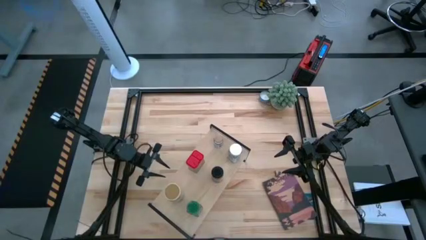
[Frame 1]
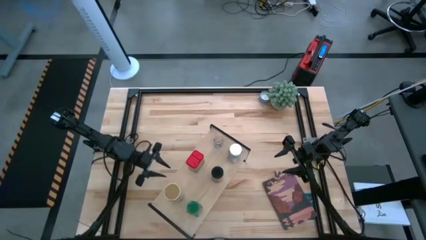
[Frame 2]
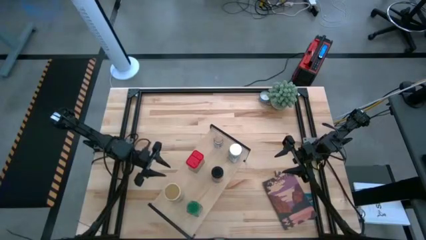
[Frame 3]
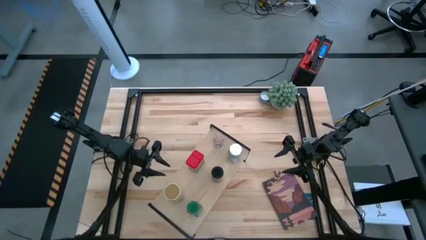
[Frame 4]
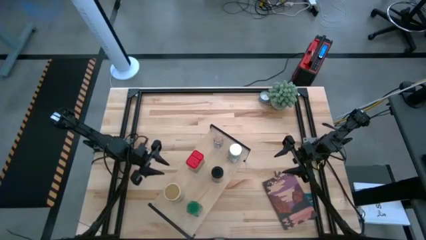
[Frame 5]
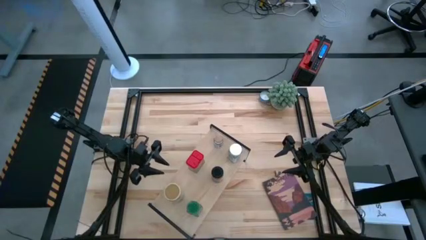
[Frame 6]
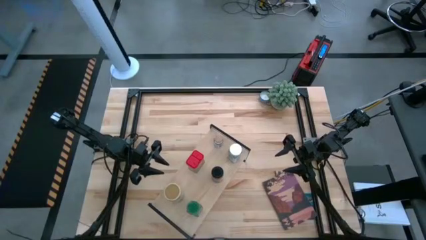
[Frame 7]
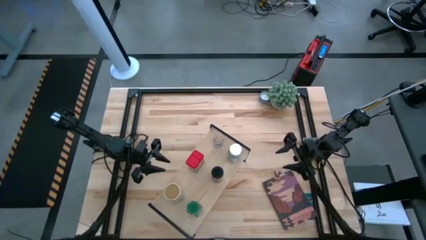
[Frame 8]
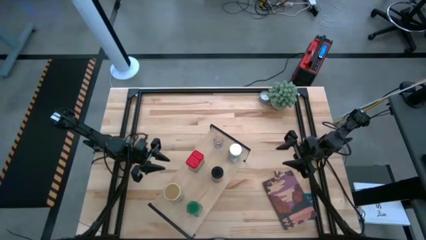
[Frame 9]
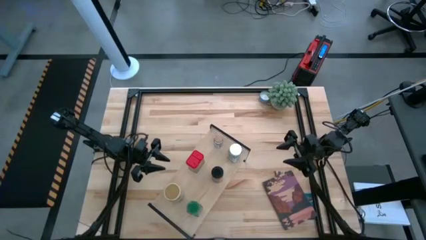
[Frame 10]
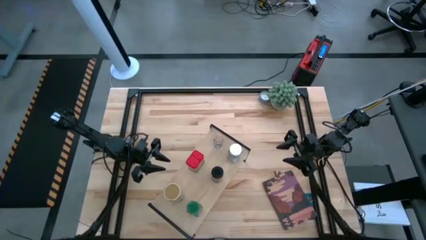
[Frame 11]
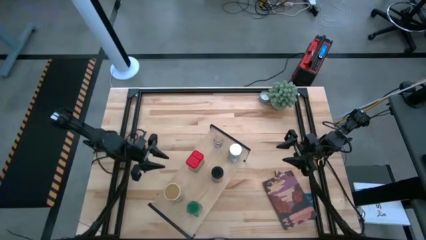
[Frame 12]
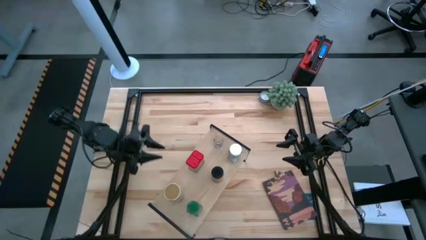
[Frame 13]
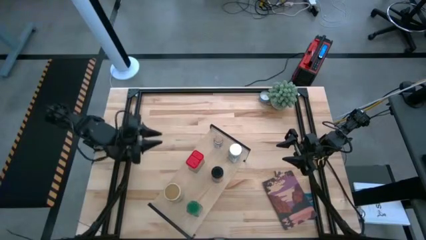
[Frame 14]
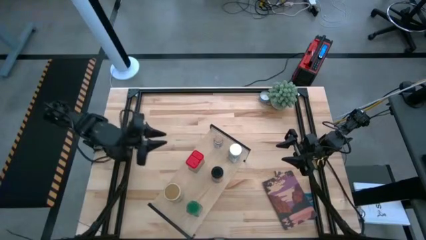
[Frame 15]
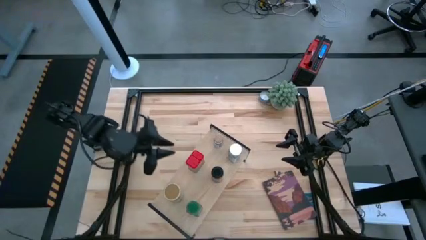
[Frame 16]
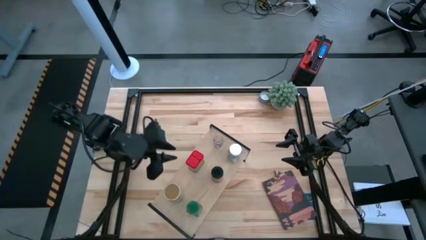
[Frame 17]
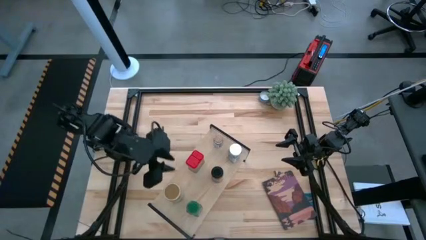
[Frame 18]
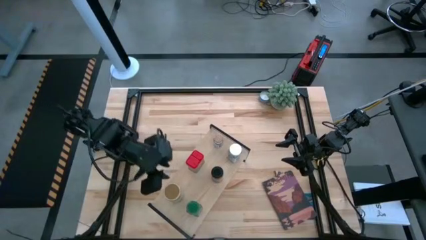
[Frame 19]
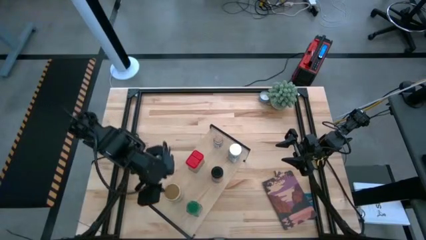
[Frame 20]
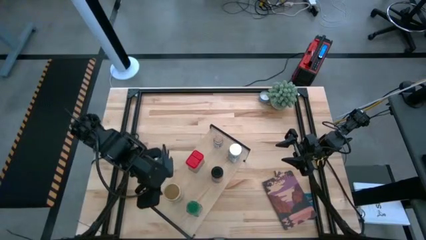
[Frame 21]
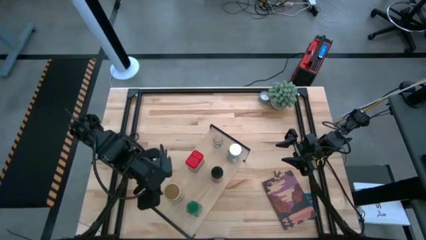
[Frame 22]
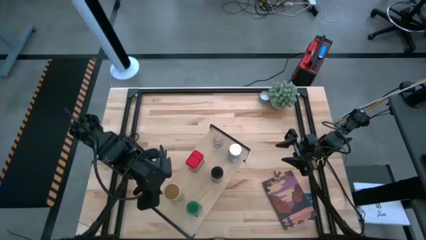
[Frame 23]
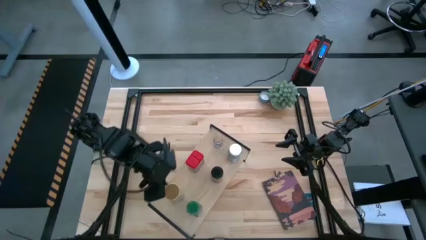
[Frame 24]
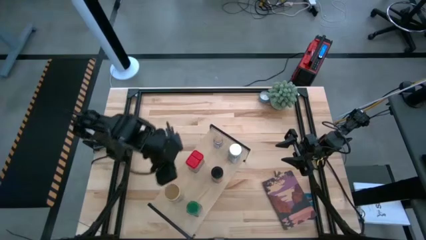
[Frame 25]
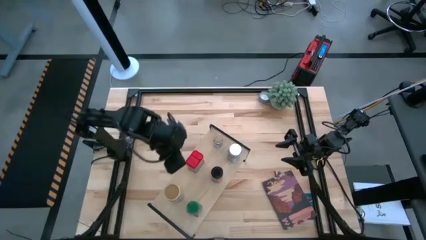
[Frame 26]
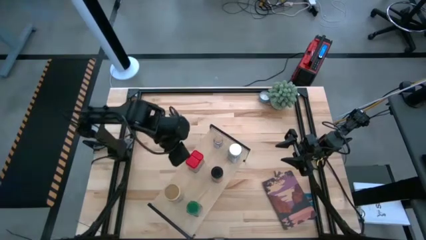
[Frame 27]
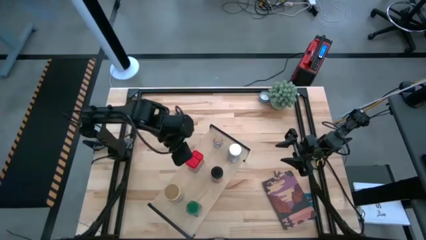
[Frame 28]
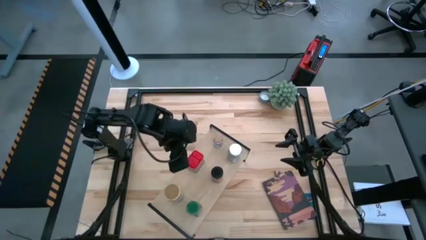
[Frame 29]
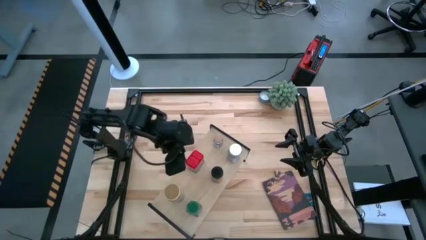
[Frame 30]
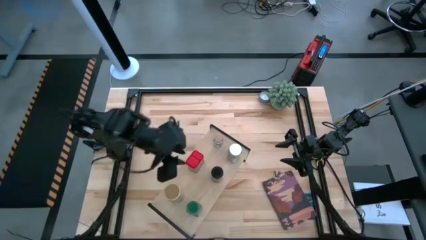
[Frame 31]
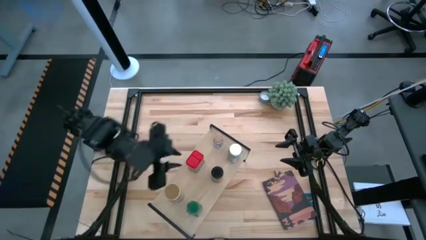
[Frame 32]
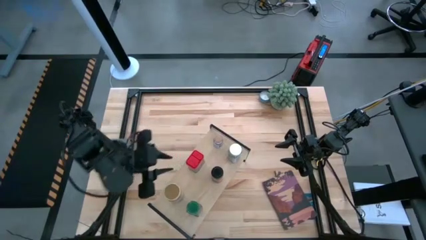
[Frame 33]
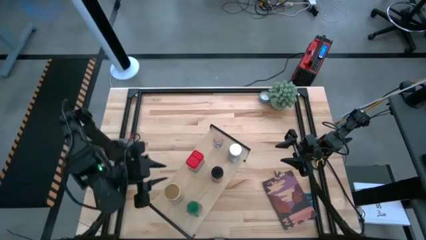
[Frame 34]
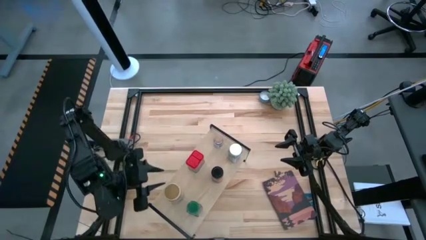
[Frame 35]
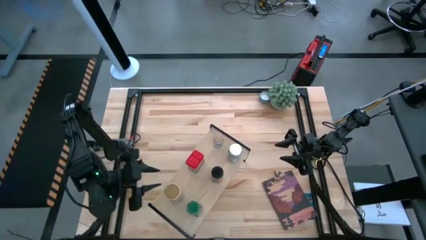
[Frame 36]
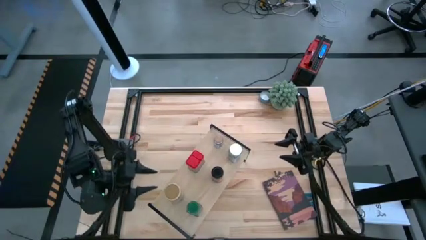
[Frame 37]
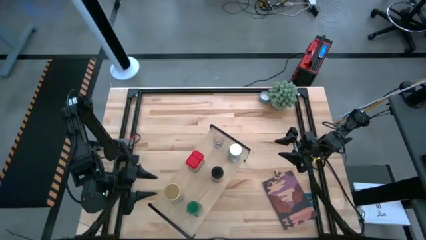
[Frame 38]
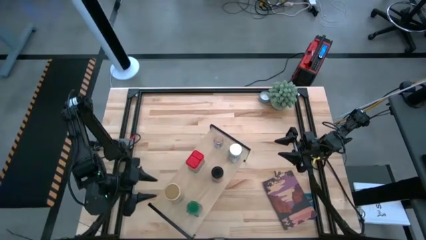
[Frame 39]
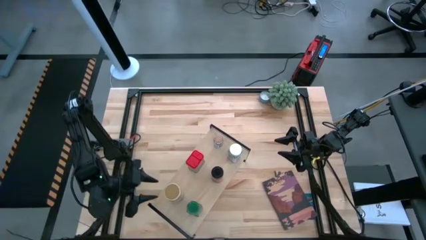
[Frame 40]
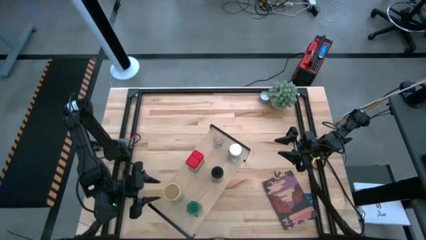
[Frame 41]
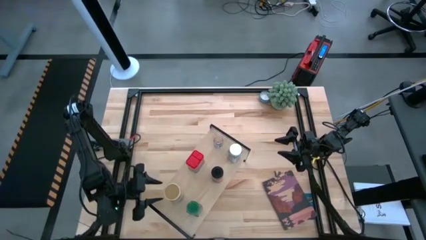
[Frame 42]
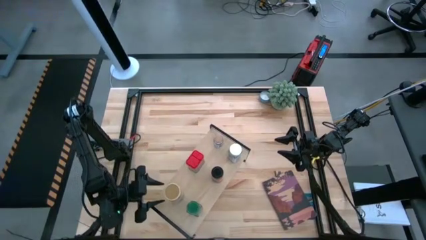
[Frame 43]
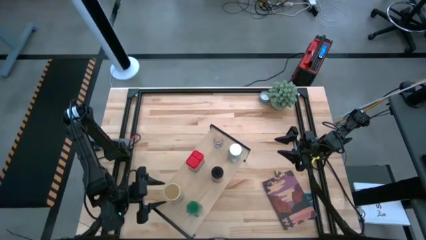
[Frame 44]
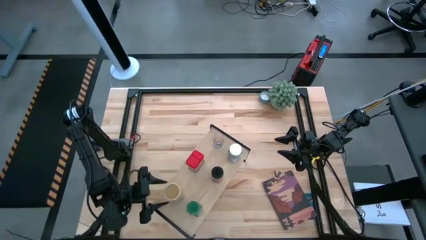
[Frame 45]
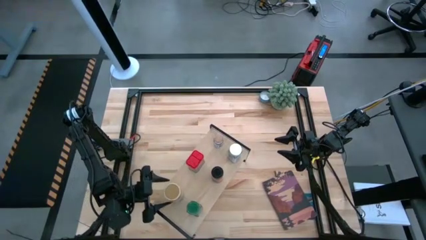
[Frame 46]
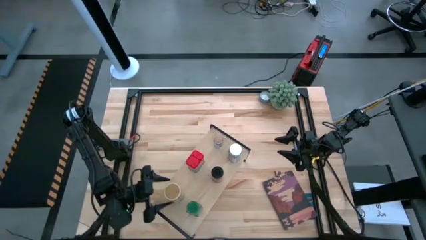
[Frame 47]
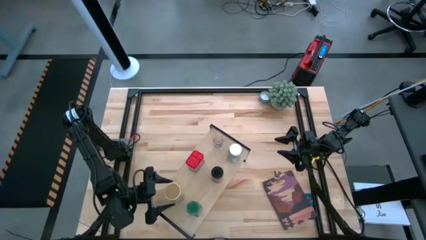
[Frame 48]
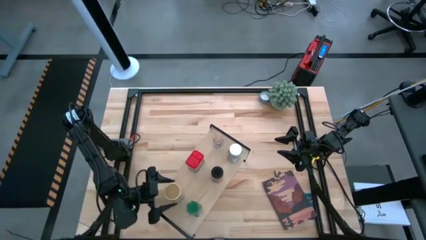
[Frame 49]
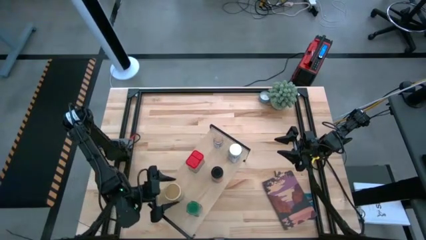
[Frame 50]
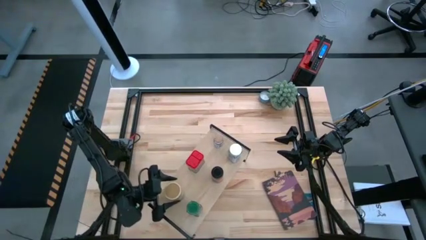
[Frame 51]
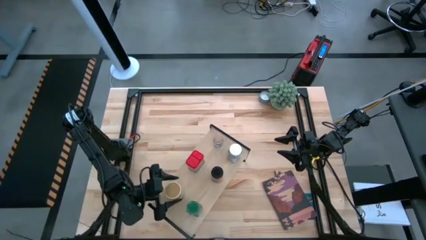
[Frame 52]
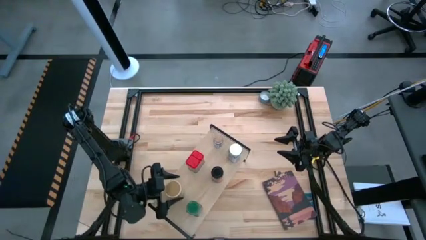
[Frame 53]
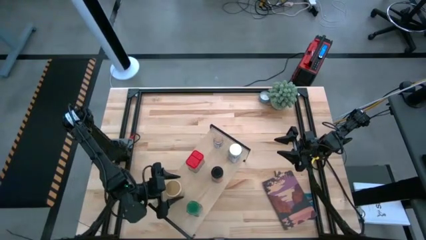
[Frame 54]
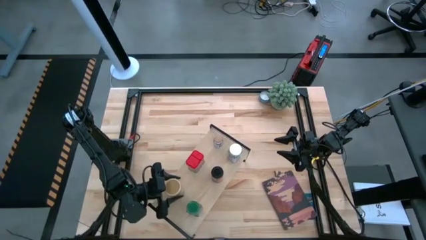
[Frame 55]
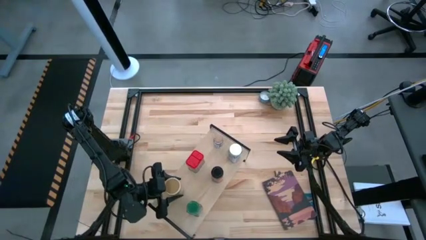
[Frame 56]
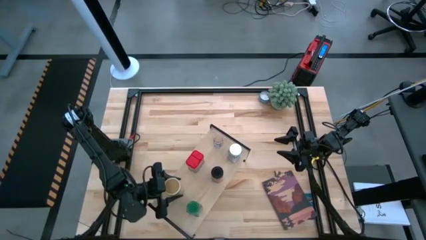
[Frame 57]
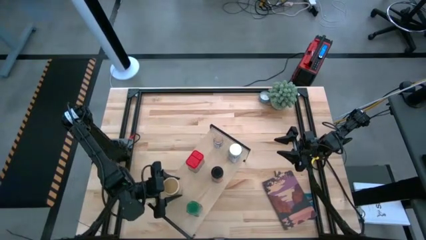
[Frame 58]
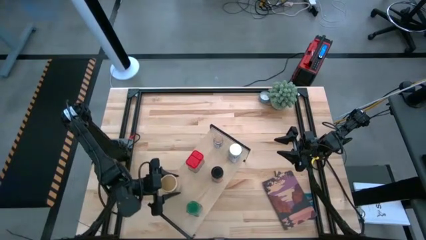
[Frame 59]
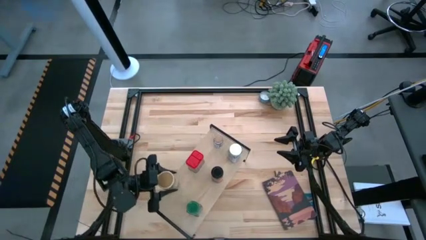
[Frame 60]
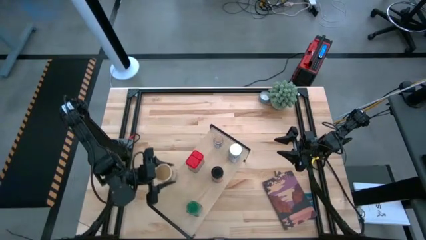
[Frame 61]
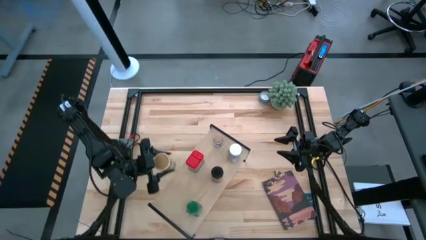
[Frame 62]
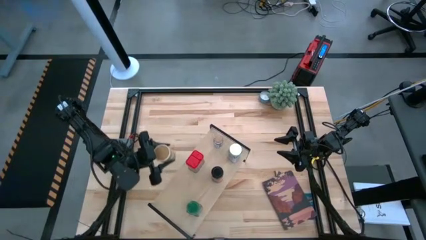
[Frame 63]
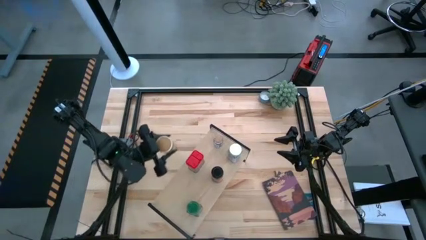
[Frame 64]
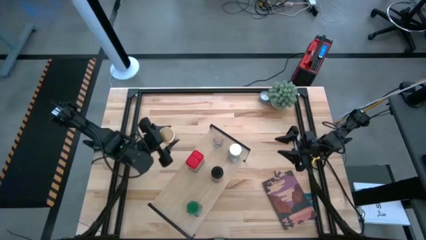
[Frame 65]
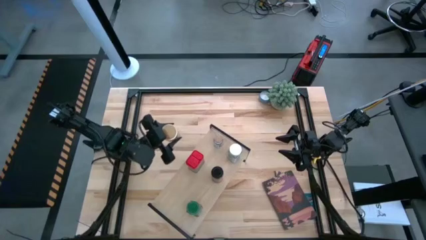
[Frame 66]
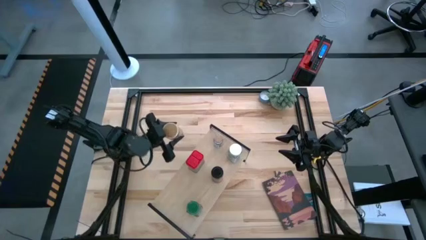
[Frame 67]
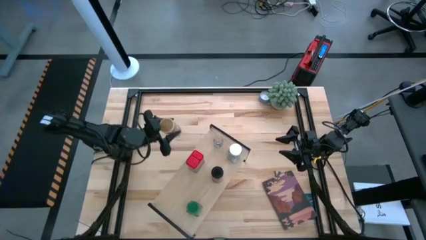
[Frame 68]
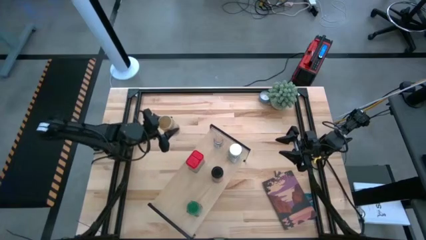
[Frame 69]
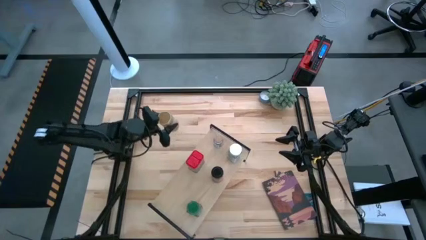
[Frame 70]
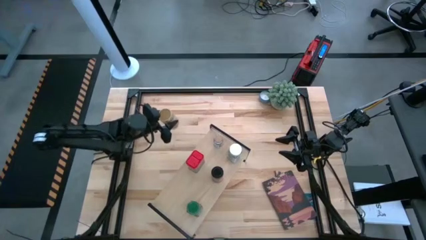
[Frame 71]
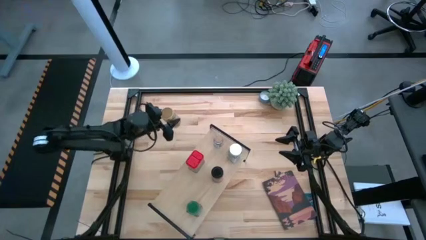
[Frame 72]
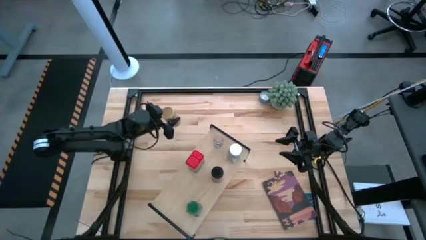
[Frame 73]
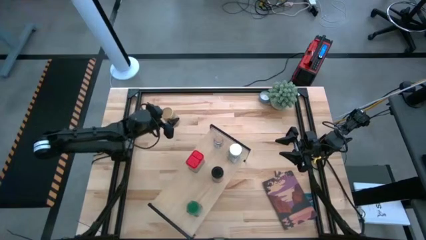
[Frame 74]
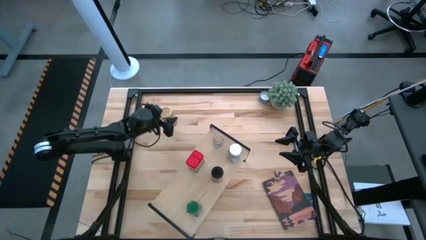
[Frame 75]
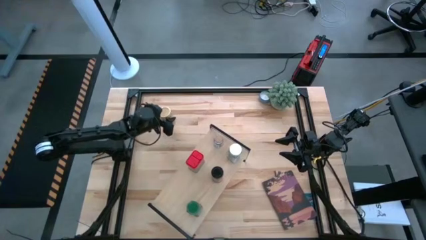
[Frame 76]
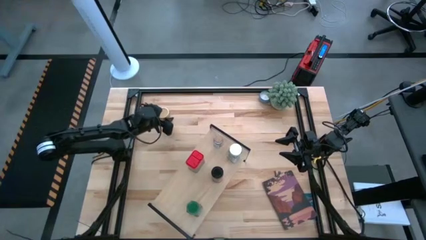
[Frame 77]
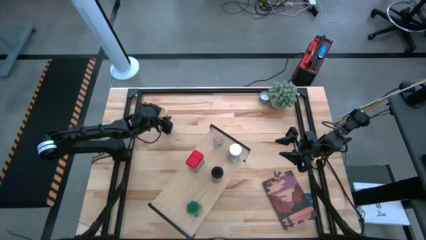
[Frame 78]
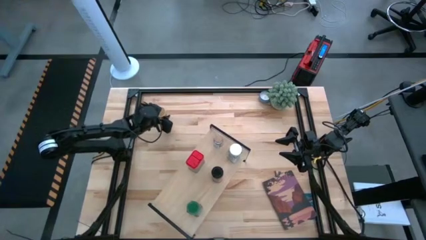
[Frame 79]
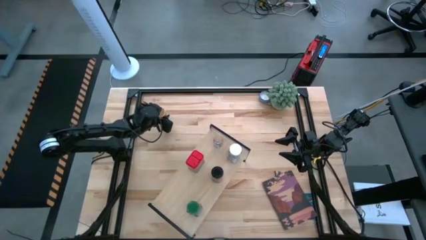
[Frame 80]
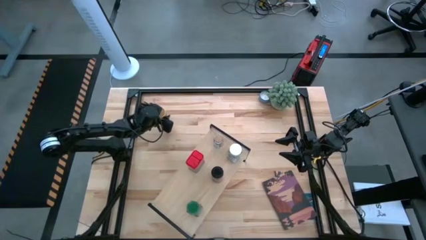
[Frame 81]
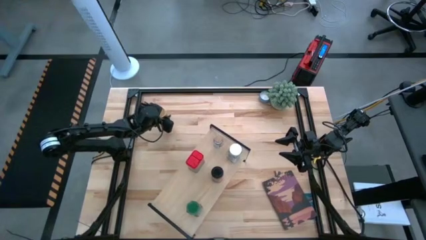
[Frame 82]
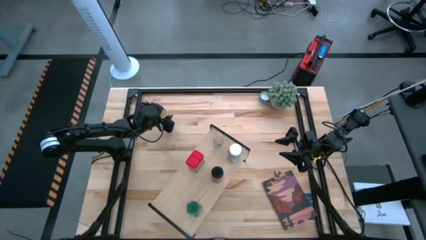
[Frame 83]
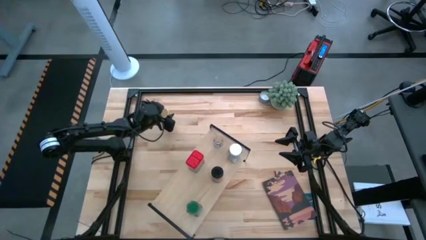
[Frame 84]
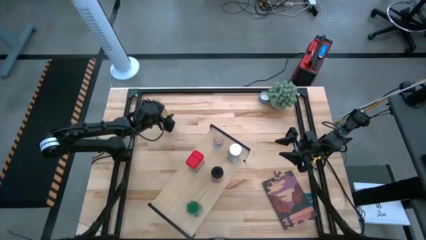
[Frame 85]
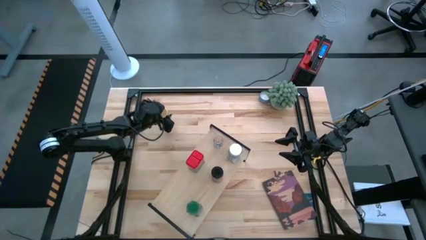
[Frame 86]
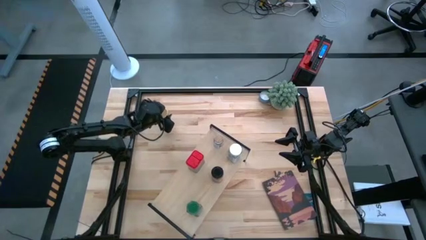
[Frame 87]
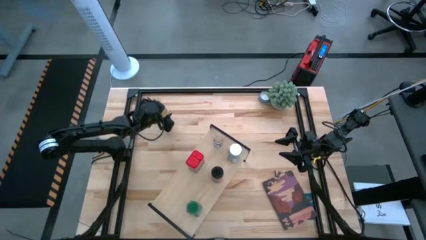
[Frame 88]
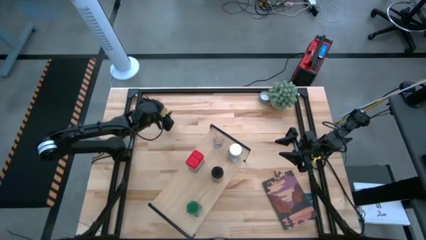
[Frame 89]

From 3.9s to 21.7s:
Task: Shelf spices
Remove the gold seasoning bottle from the shelf
